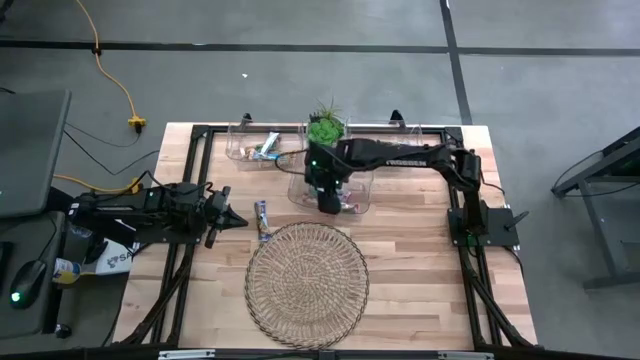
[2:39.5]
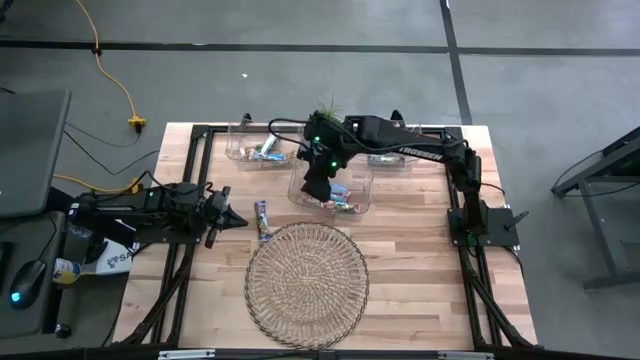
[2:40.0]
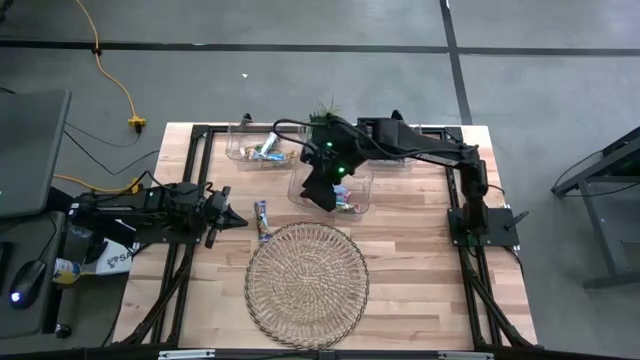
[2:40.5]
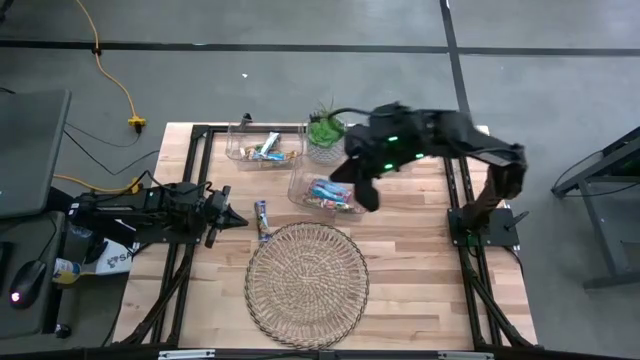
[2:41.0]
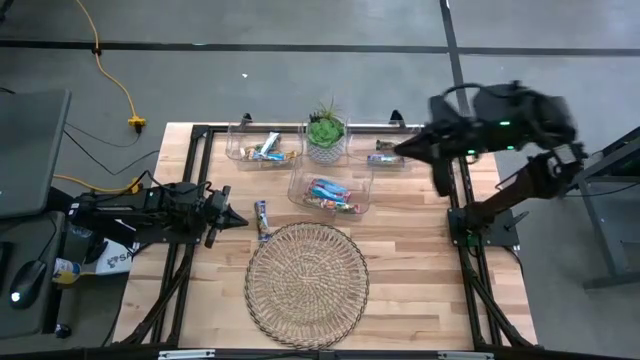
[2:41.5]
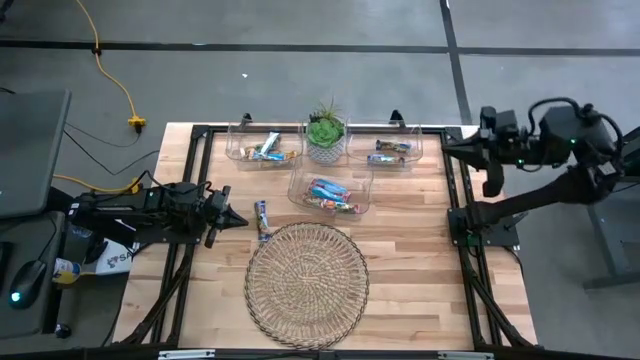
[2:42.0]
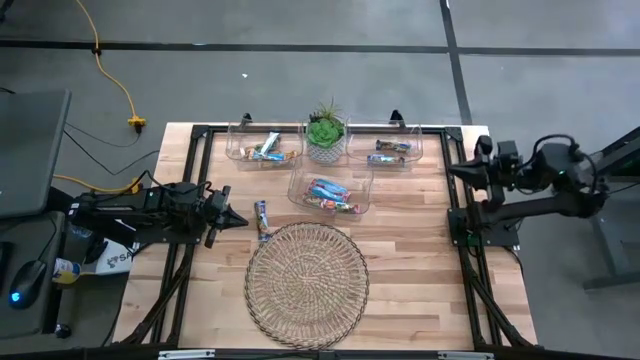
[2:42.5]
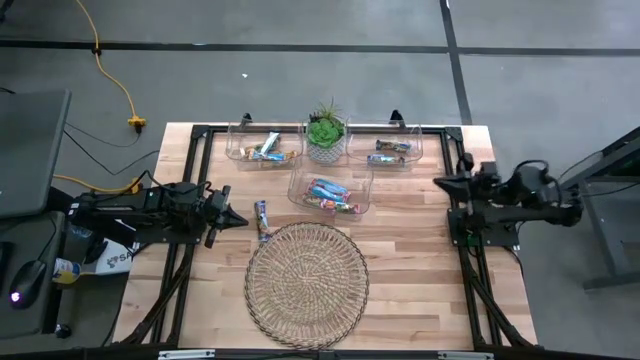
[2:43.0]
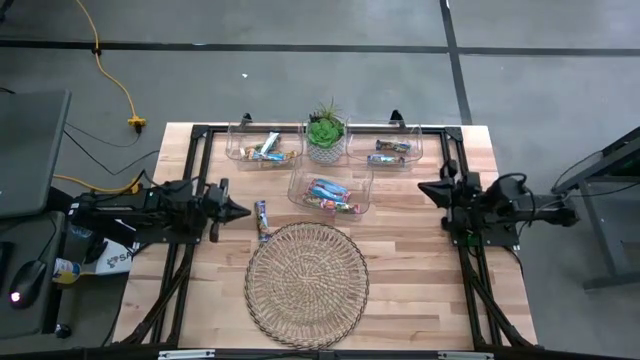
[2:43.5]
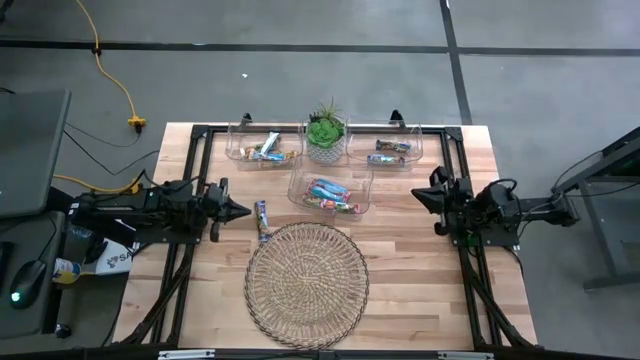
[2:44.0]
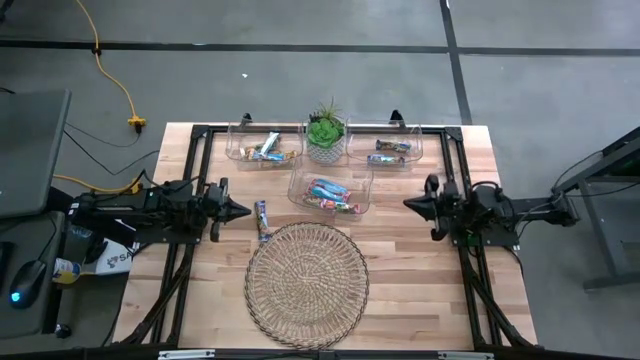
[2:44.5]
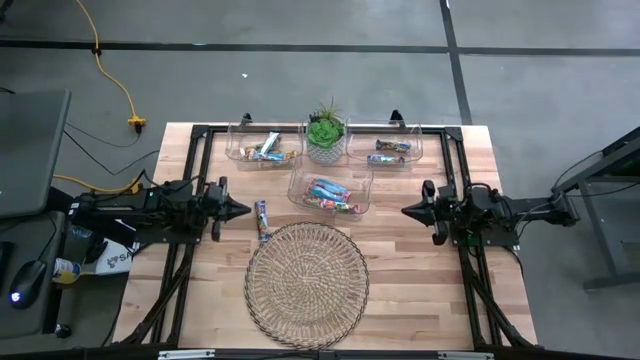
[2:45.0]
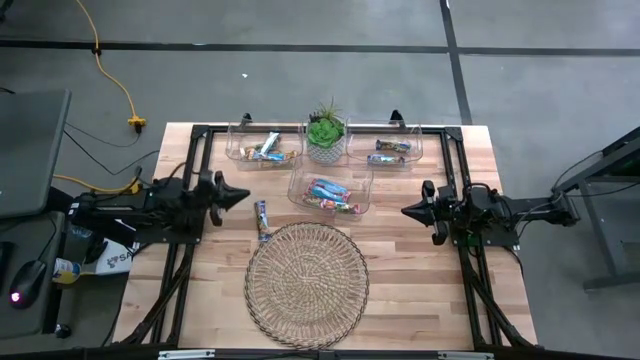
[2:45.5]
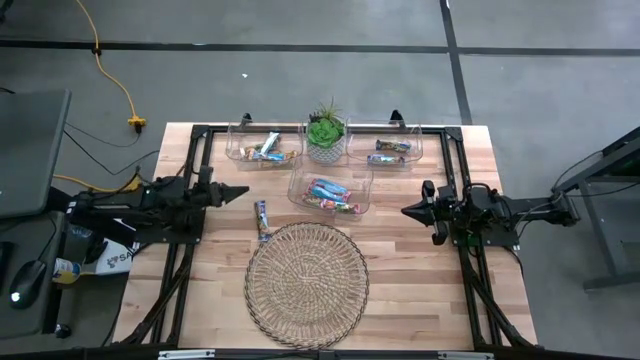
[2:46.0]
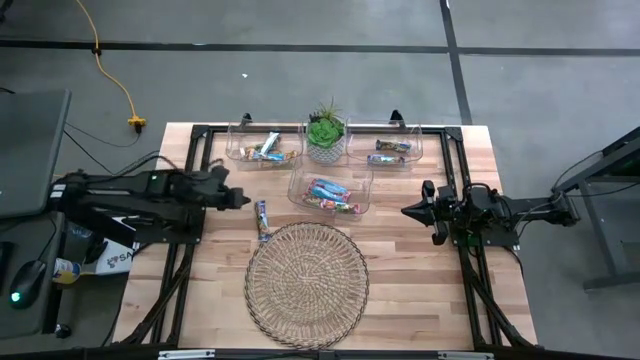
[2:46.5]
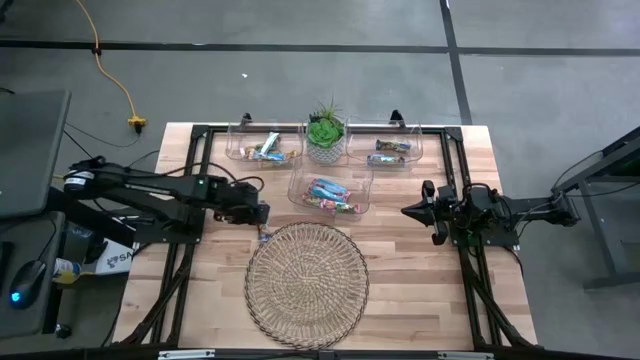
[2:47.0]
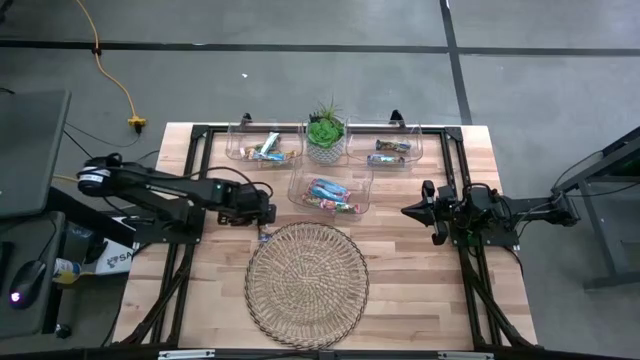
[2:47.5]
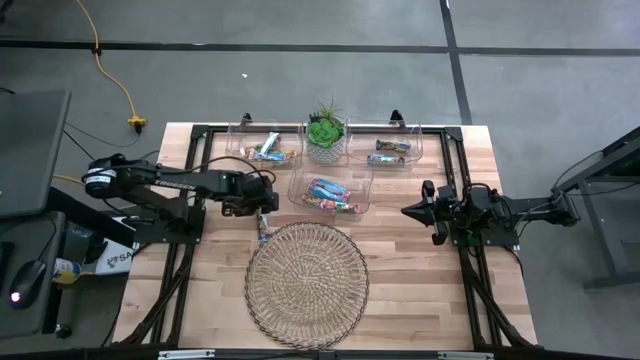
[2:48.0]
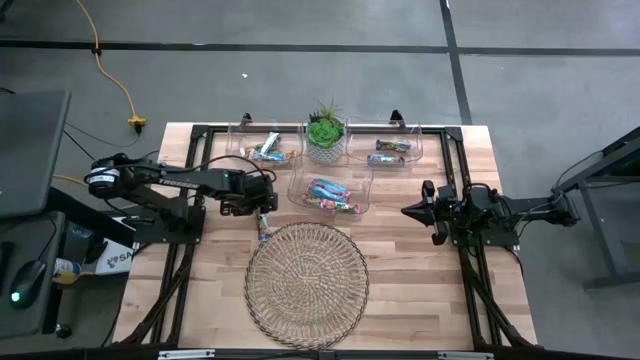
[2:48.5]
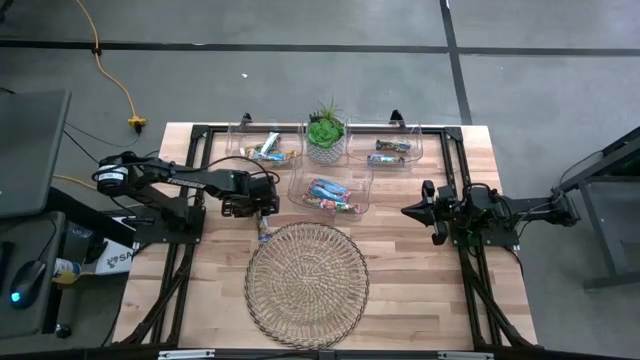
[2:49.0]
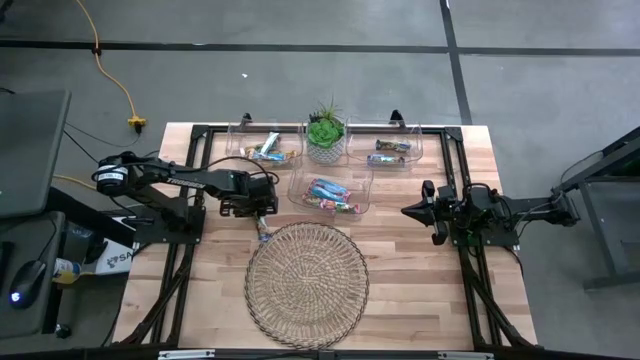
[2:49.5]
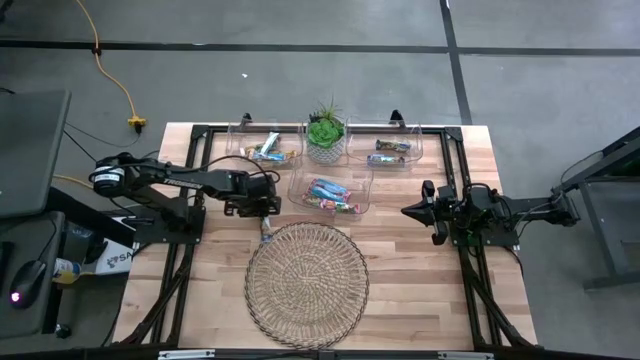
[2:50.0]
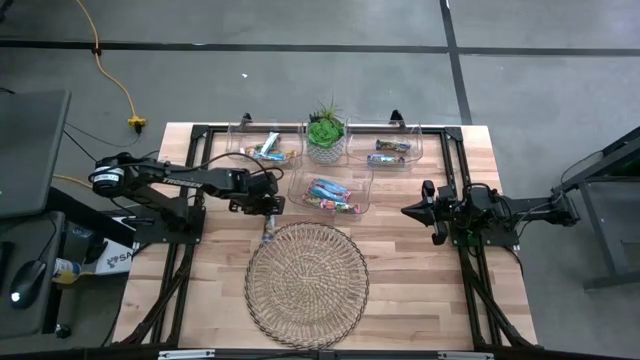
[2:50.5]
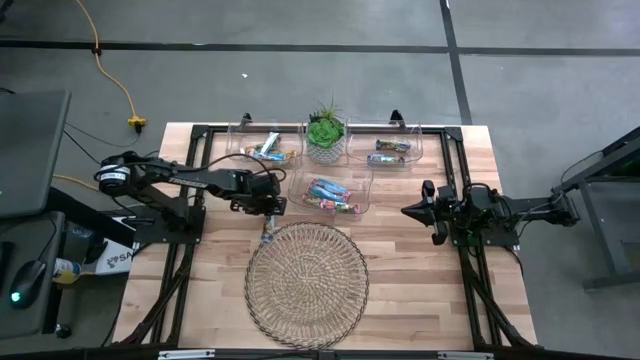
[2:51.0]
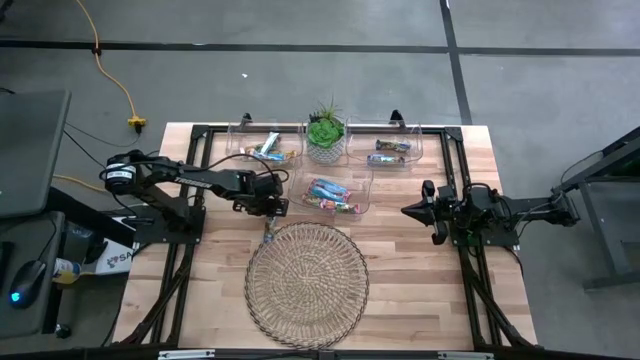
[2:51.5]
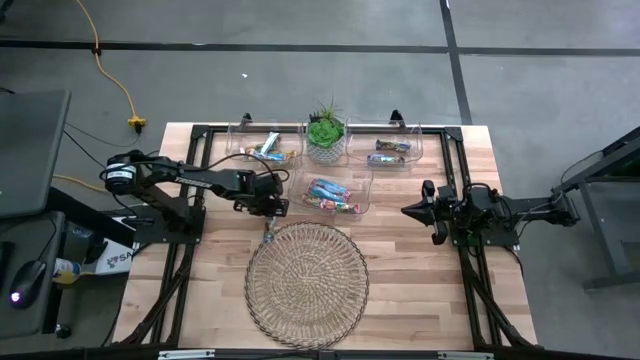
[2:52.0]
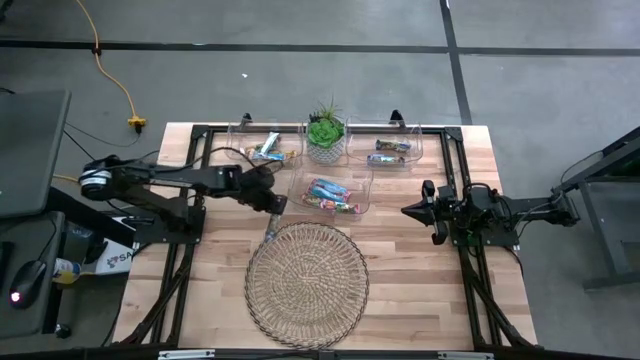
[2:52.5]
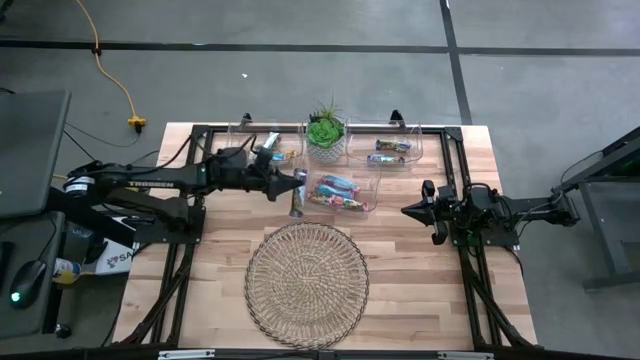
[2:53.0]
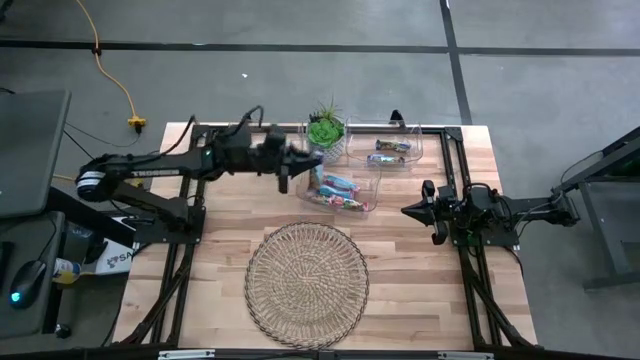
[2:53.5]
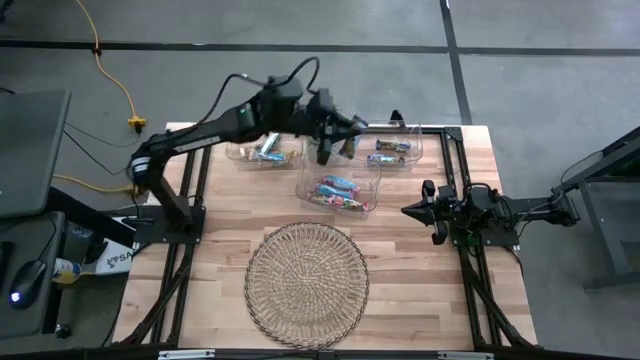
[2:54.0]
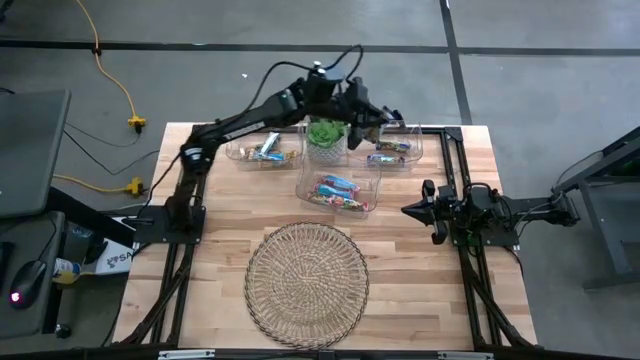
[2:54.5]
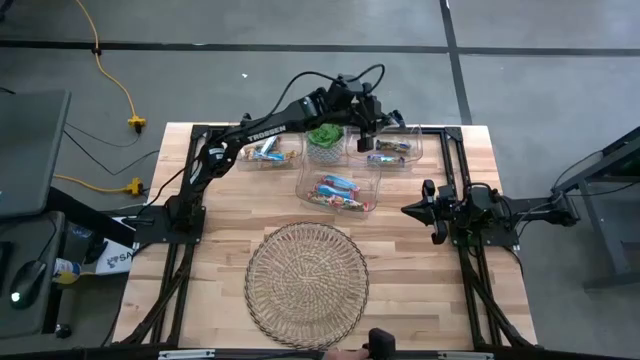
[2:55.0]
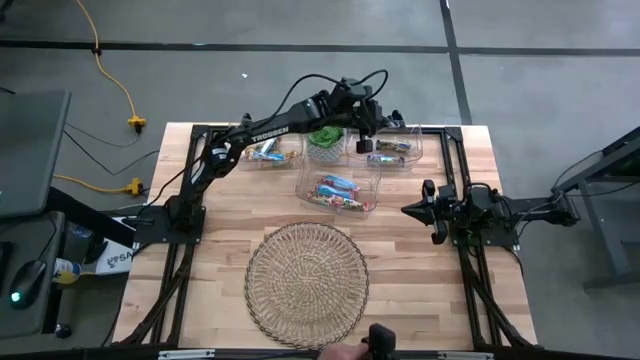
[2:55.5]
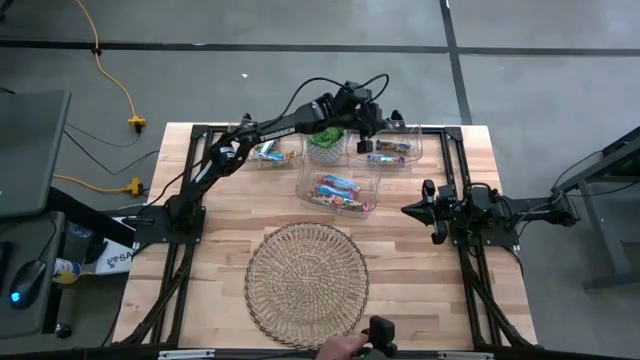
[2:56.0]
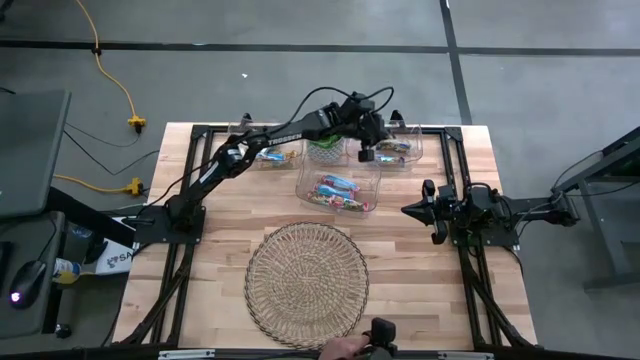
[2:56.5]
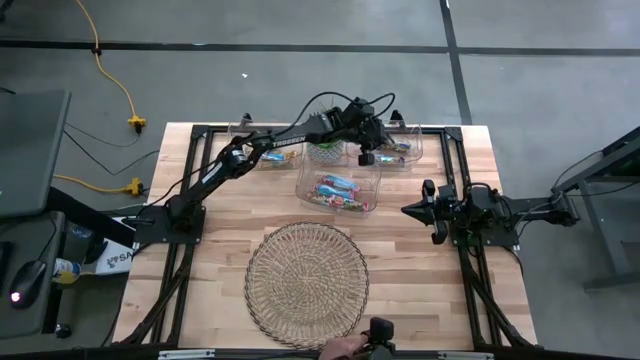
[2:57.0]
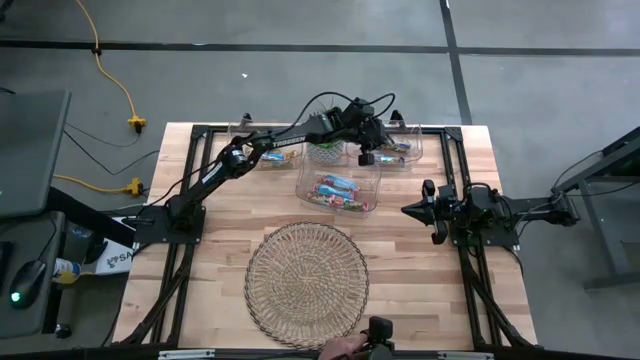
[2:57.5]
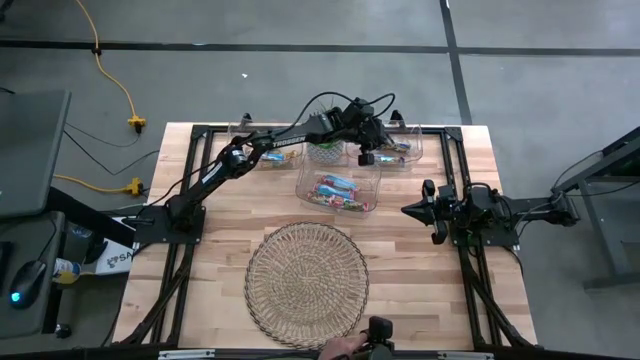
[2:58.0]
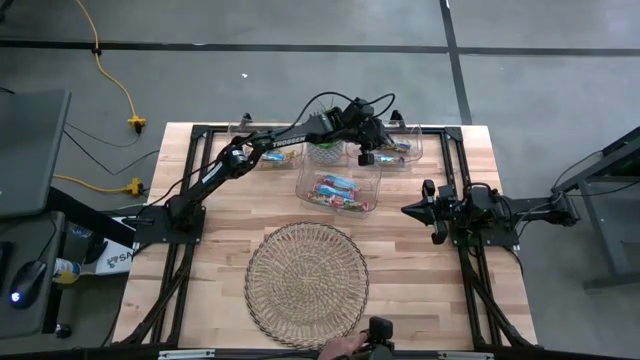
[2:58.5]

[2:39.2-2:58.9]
Task: Pick and place Granola Bars by type
Put the blue granola bar into the top right transparent bin
